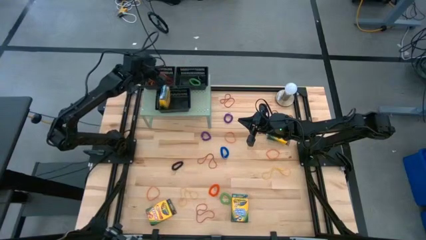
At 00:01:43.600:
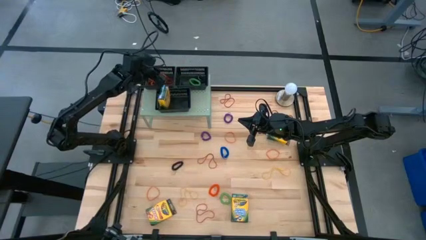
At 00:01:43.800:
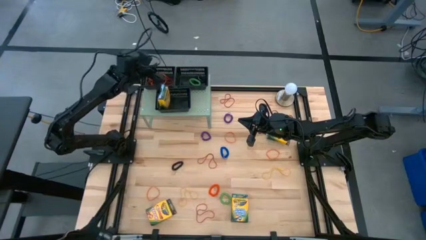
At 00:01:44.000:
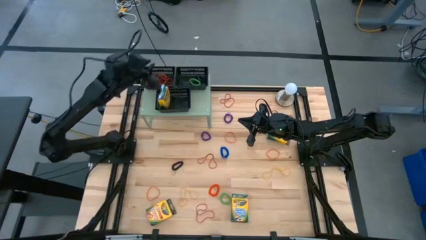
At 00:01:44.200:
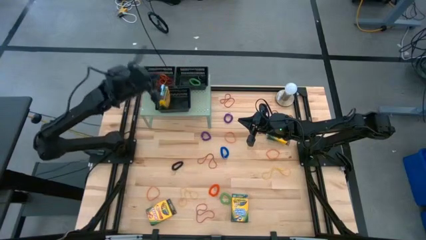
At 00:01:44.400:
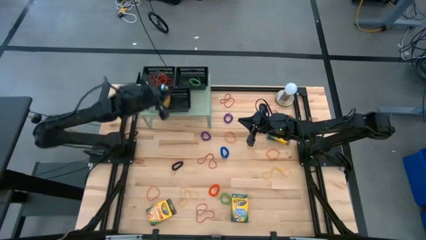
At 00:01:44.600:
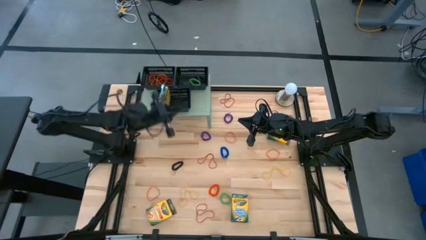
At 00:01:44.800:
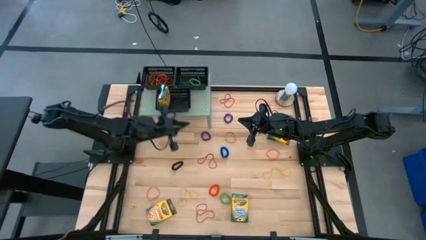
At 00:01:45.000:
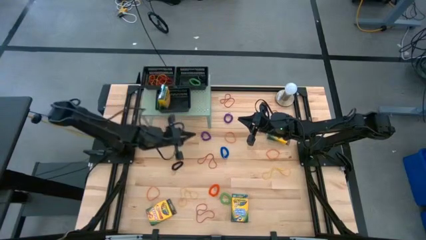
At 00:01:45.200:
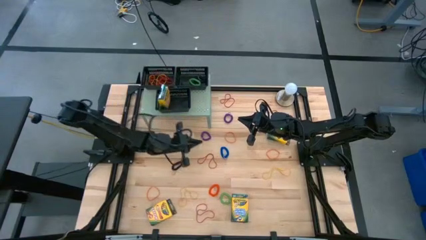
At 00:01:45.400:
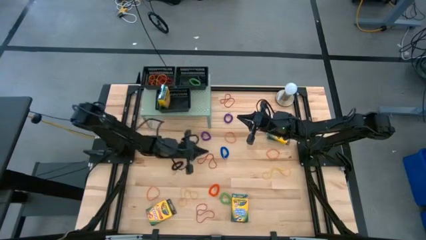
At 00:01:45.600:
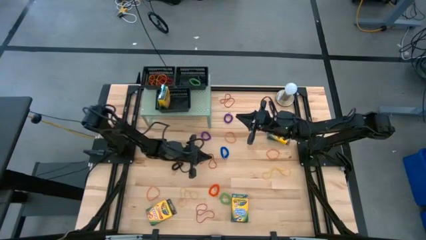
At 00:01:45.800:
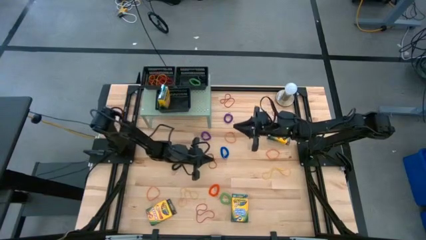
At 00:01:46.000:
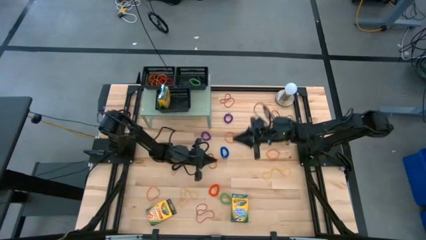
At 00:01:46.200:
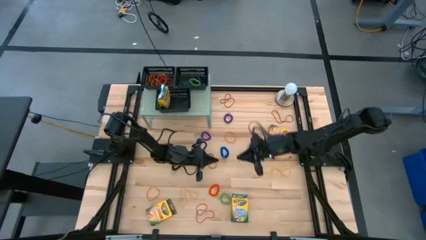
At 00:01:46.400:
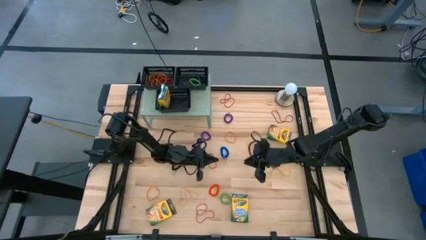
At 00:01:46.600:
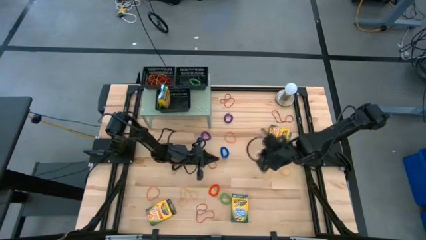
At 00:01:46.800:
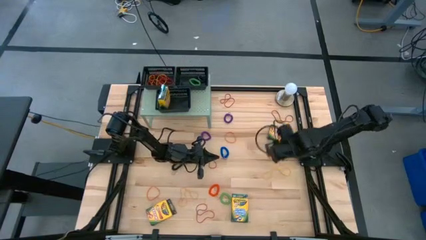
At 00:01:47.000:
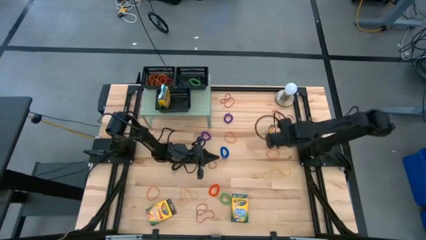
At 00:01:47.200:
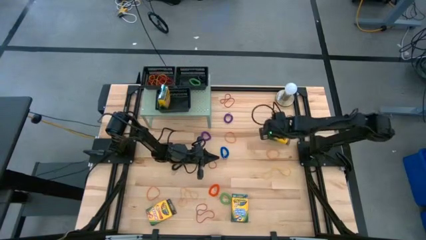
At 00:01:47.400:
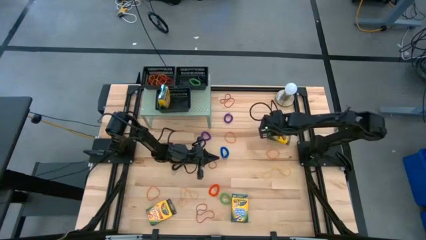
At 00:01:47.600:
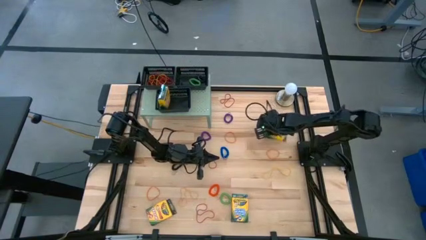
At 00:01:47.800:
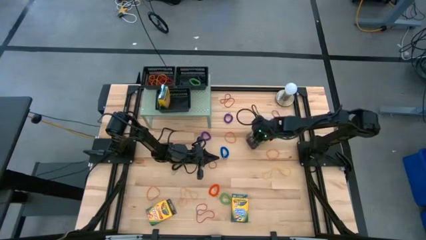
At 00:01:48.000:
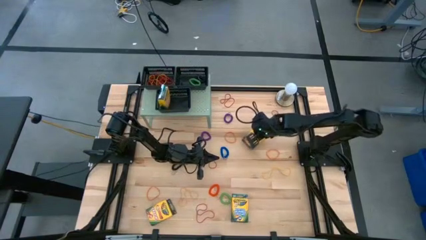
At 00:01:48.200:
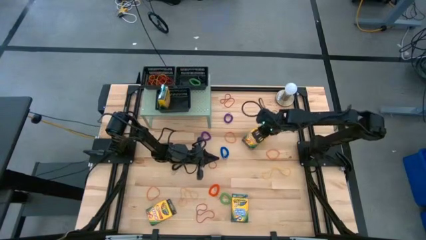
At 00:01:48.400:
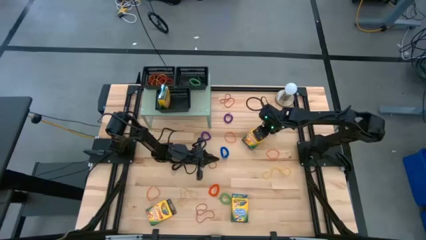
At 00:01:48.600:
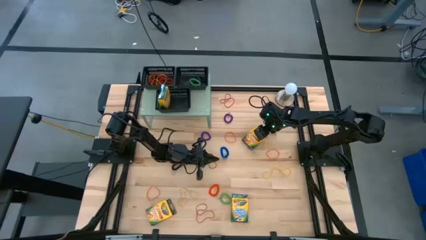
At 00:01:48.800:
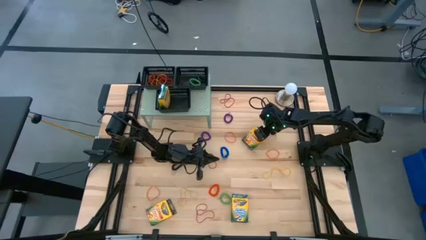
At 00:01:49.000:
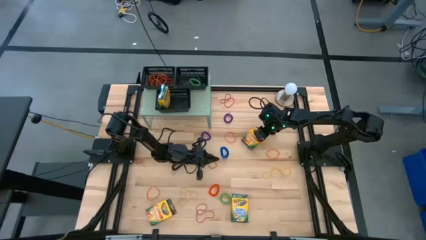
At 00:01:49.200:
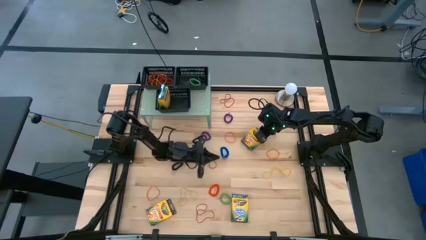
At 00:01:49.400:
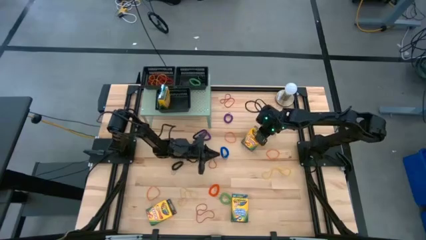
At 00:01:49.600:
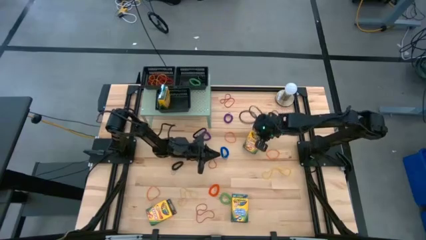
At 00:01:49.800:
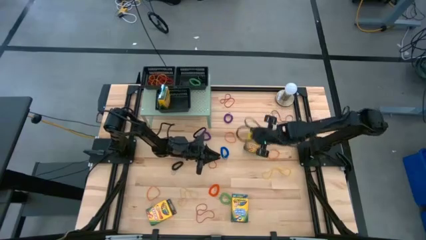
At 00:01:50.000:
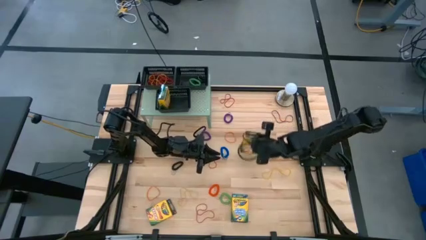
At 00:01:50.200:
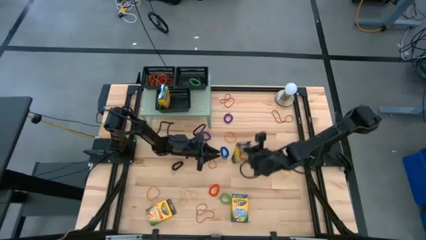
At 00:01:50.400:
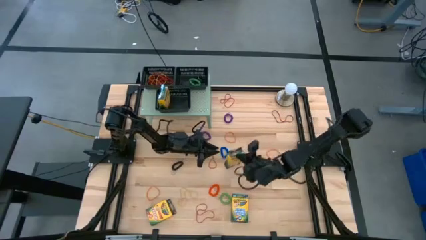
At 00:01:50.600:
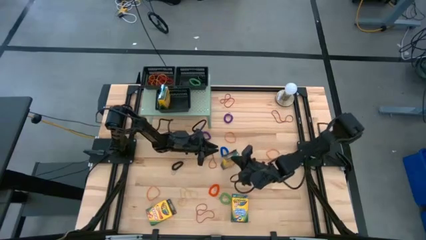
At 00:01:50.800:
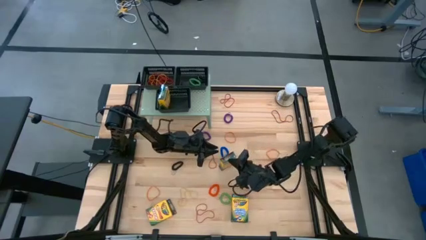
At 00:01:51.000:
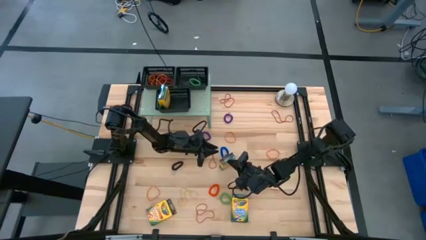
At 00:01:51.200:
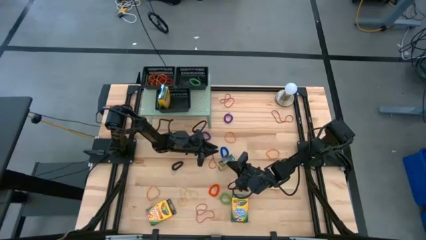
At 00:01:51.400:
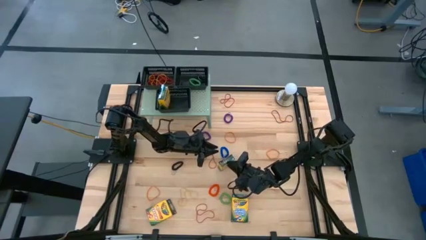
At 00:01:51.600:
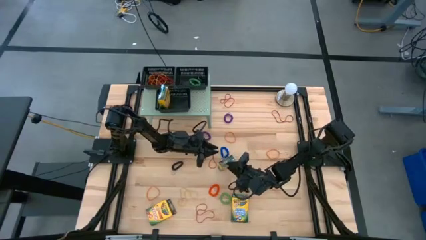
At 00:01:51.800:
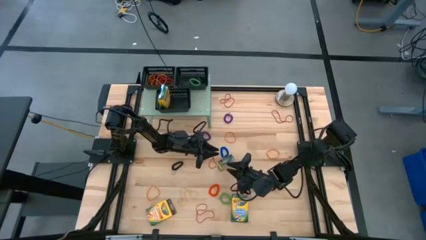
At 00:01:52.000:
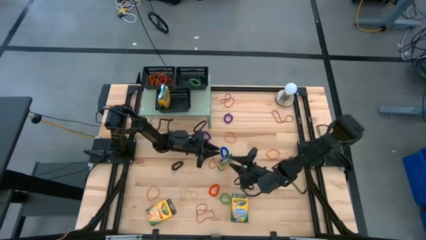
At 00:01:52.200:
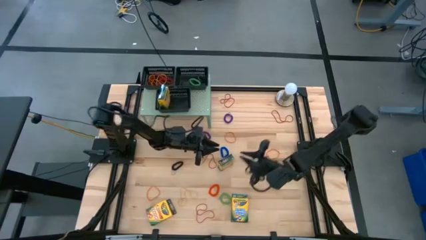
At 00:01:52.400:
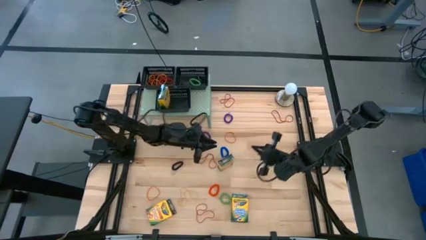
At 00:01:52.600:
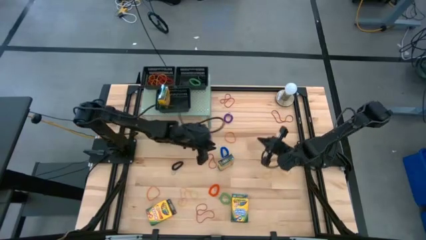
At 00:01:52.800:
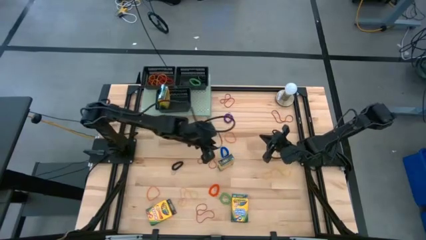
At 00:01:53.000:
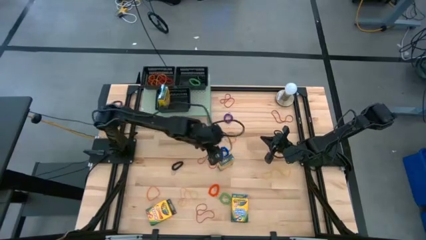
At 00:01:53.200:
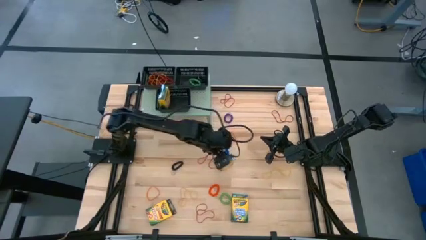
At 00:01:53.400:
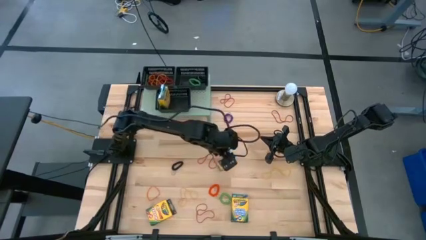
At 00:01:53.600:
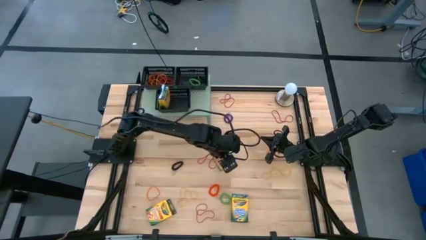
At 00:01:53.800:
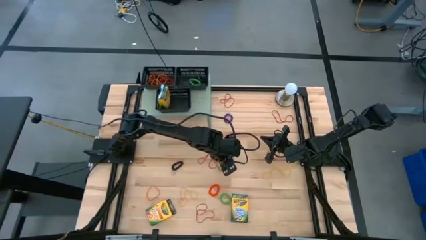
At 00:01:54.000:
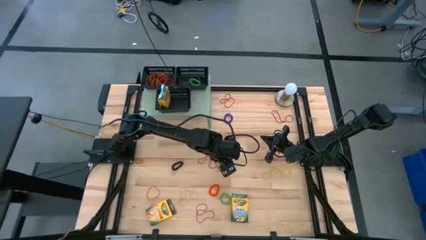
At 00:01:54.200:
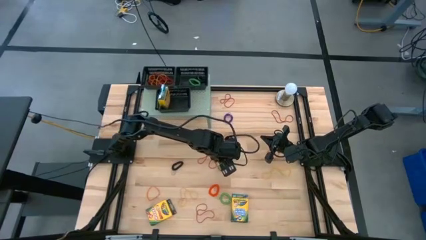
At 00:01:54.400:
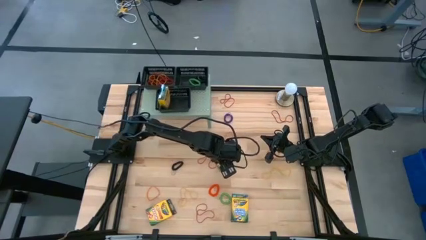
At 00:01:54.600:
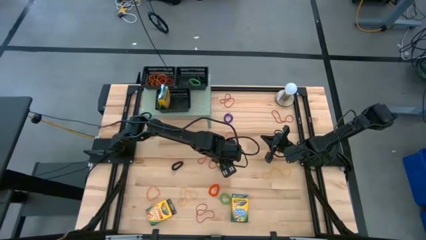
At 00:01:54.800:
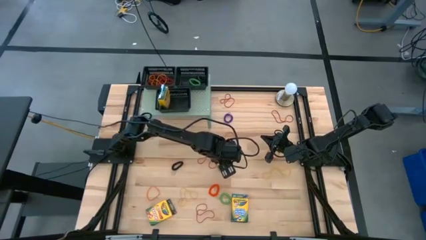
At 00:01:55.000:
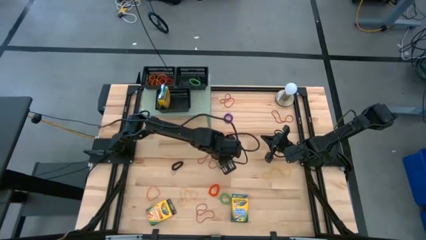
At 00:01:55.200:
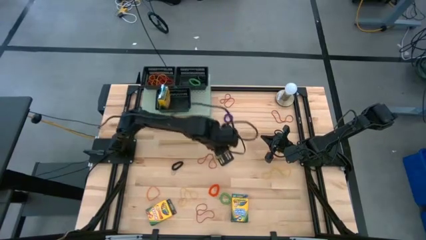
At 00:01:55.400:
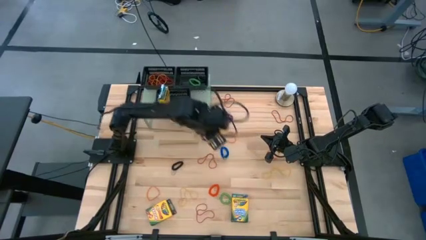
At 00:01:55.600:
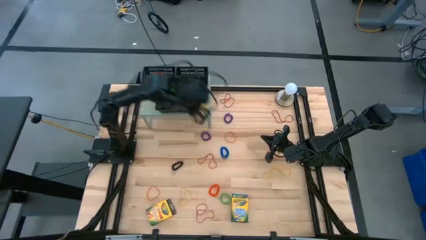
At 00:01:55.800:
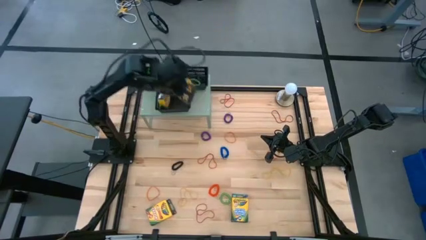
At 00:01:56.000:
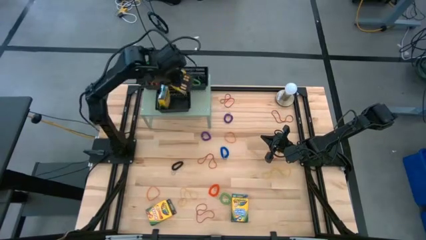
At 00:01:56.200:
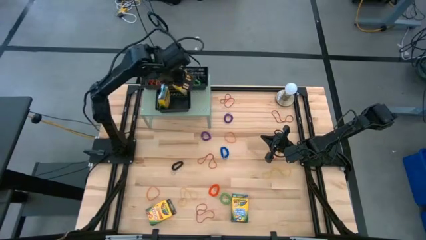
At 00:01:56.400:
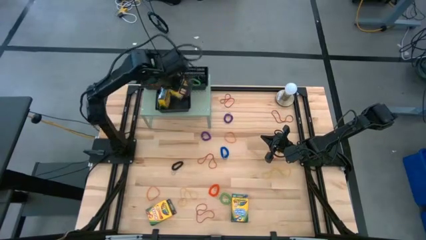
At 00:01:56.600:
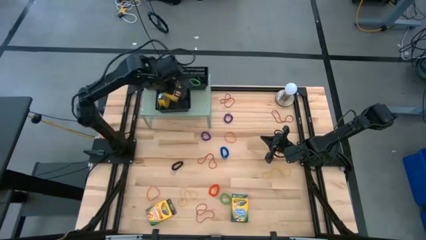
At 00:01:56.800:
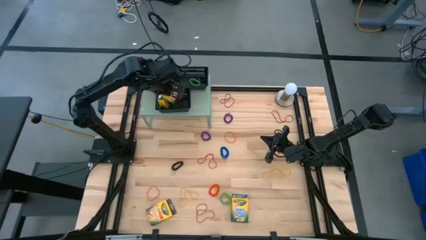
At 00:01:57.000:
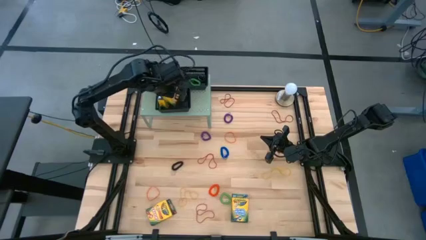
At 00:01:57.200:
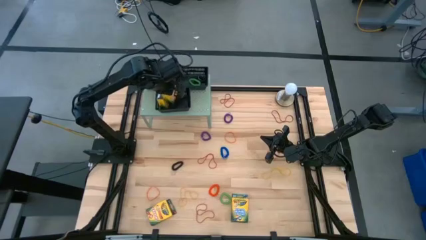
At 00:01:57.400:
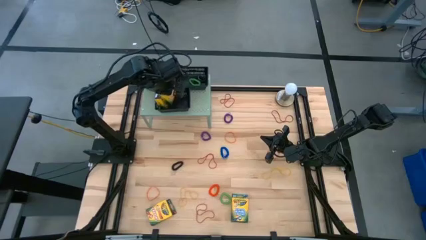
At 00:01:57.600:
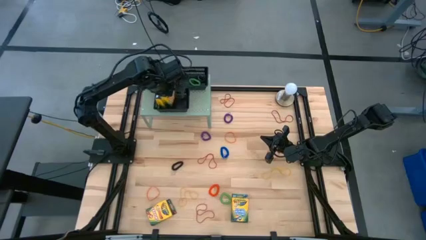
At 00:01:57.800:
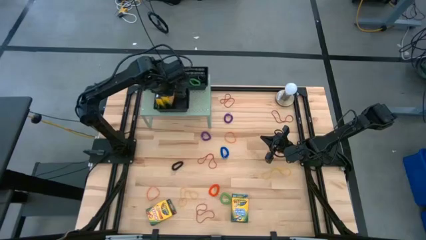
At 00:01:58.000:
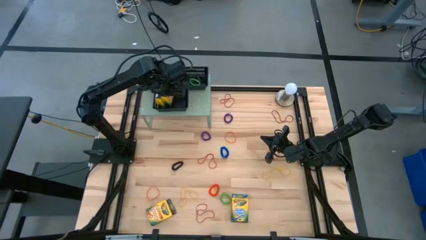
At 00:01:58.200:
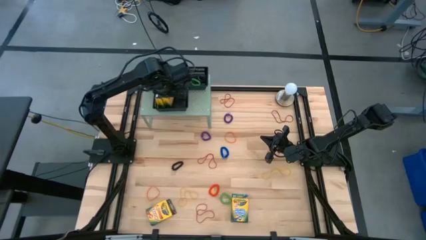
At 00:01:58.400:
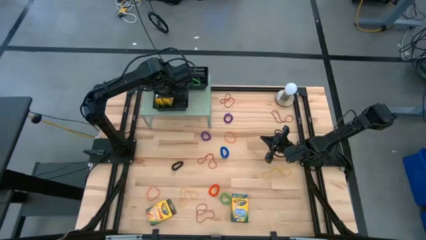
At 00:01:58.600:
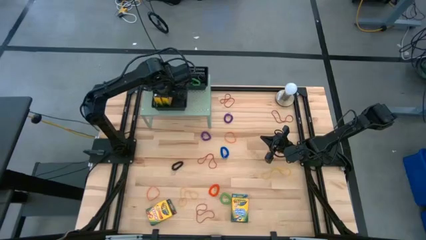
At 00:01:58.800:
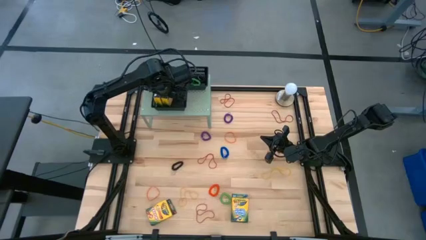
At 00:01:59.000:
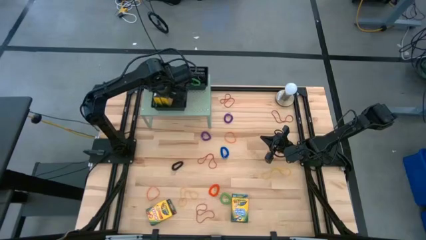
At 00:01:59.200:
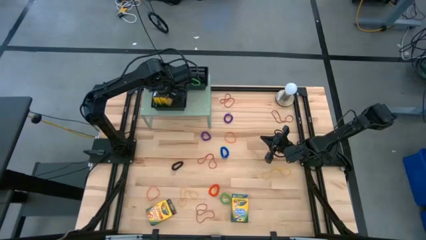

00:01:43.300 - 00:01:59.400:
Task: Pick & Place Office Desk Supplies
Put the crayon box into the bottom black bin on the shelf
